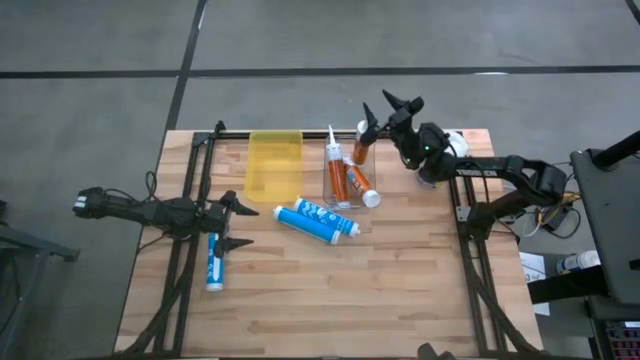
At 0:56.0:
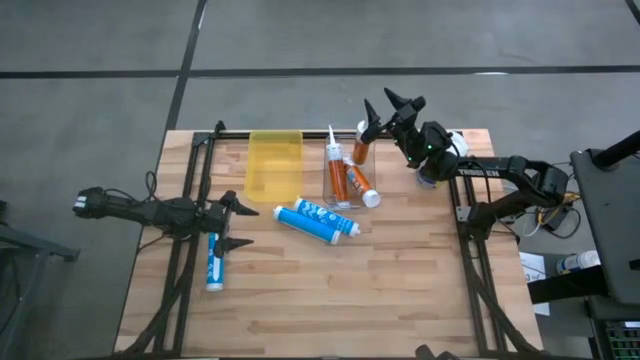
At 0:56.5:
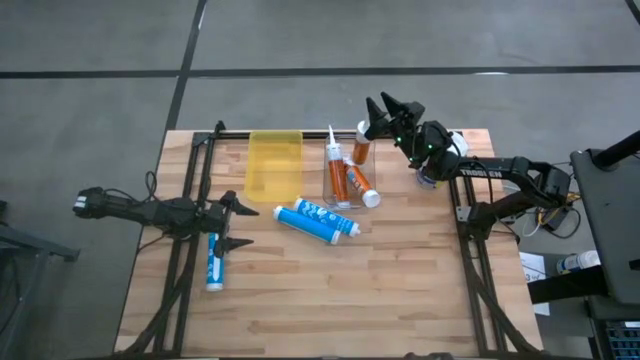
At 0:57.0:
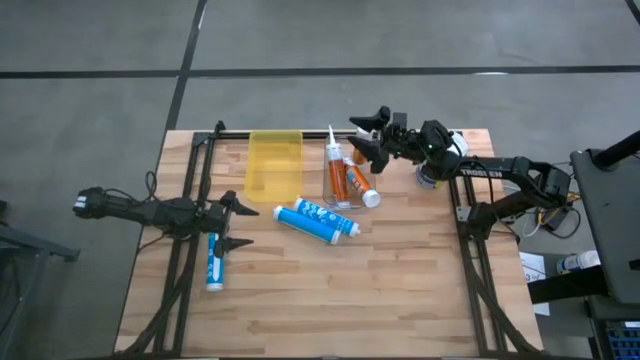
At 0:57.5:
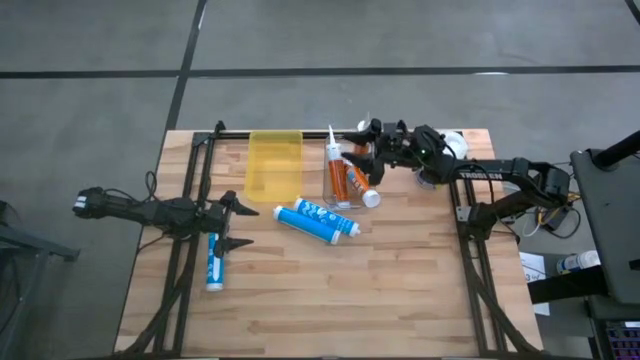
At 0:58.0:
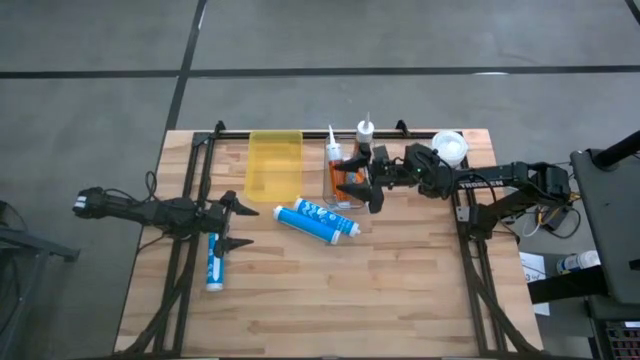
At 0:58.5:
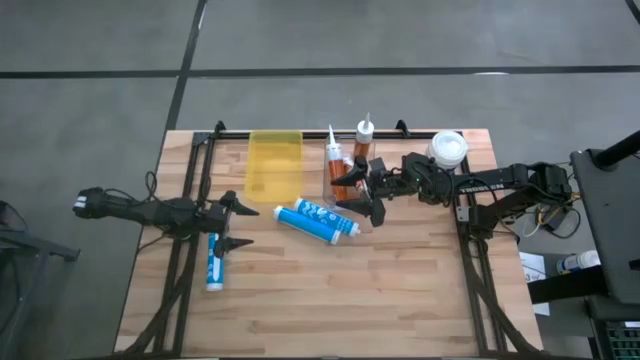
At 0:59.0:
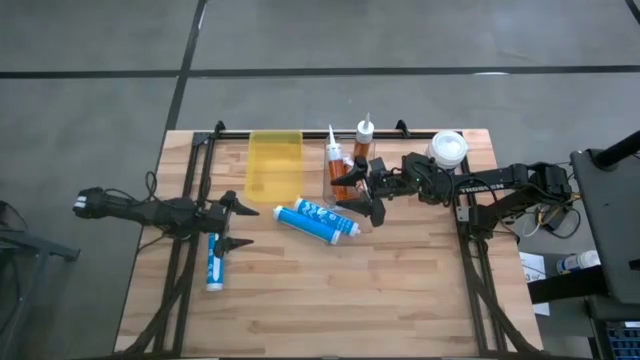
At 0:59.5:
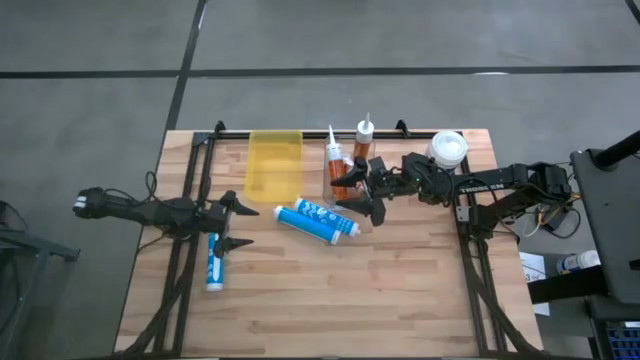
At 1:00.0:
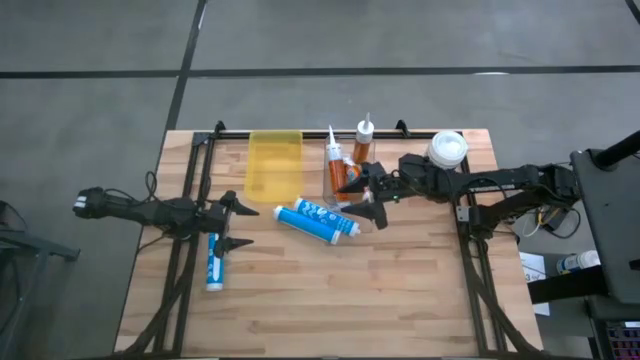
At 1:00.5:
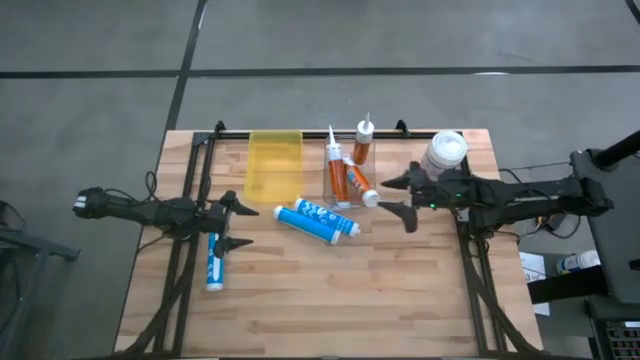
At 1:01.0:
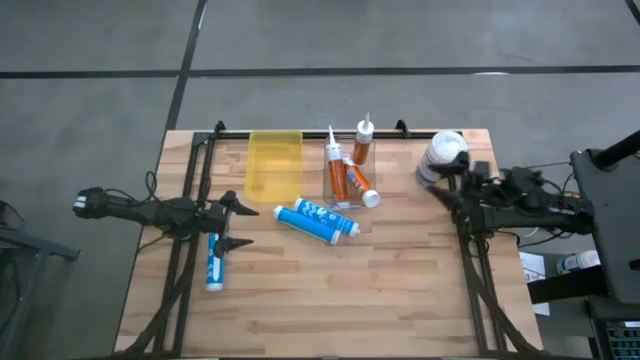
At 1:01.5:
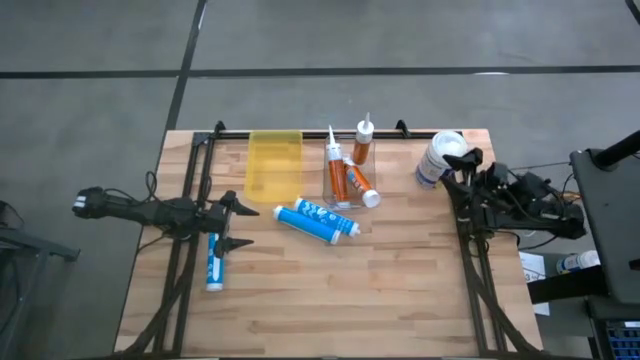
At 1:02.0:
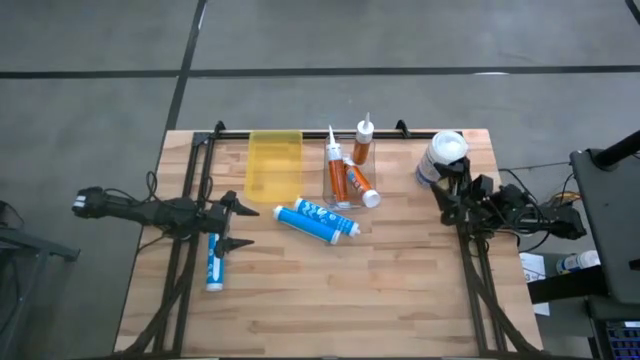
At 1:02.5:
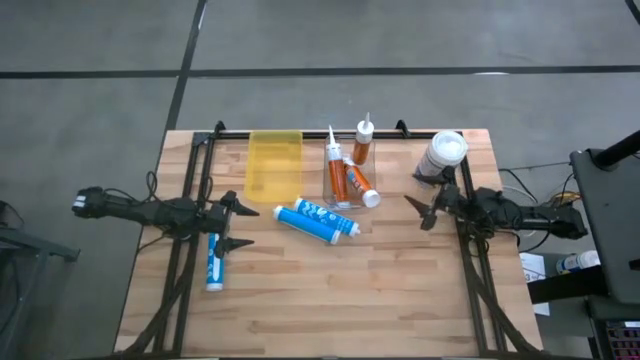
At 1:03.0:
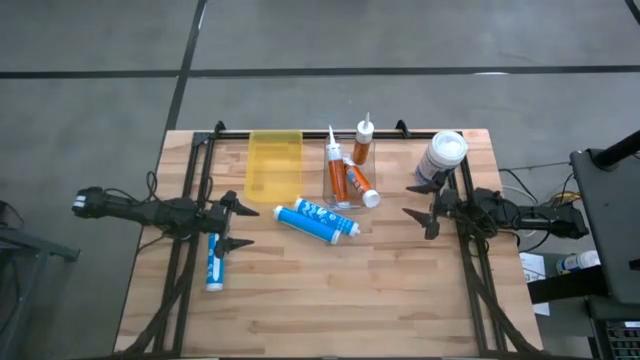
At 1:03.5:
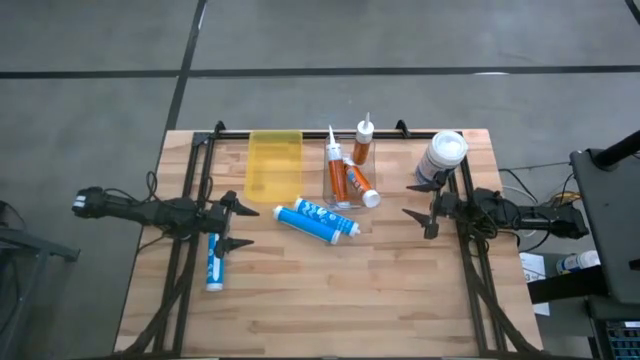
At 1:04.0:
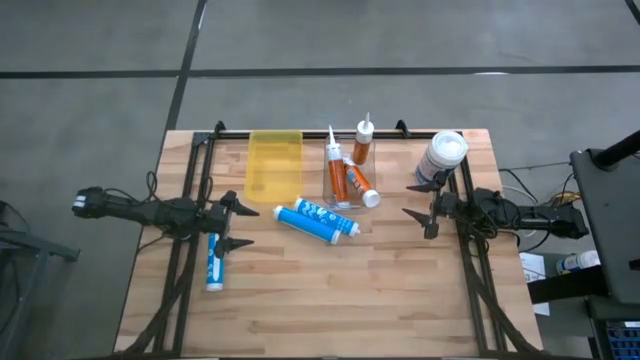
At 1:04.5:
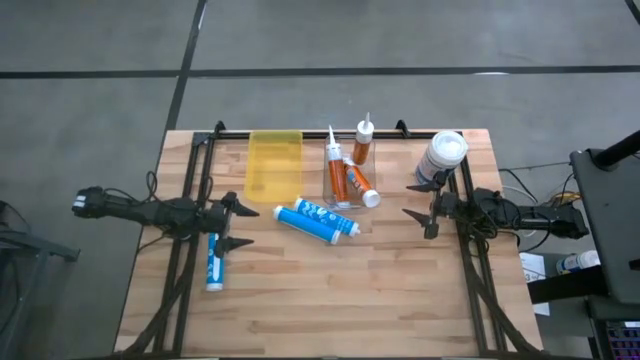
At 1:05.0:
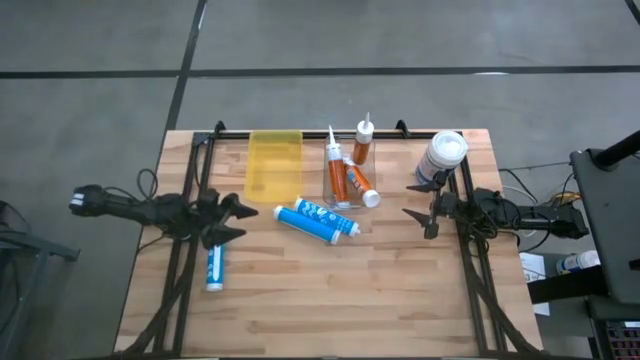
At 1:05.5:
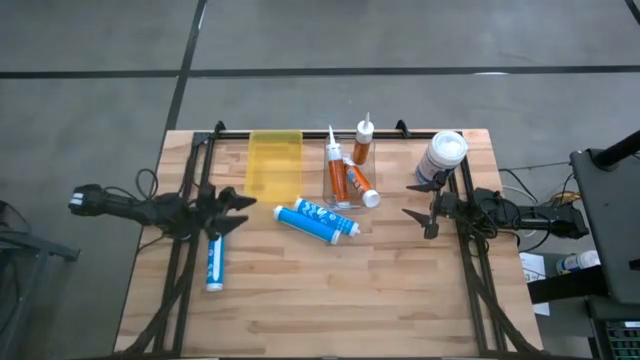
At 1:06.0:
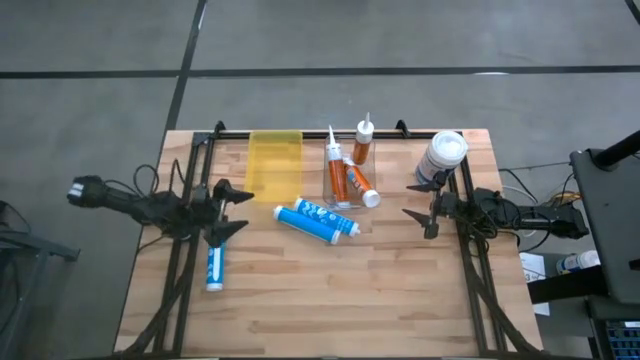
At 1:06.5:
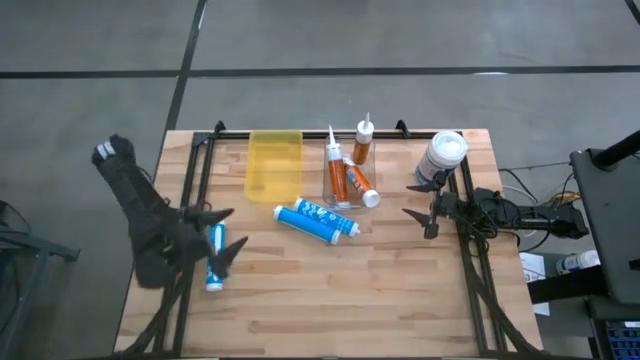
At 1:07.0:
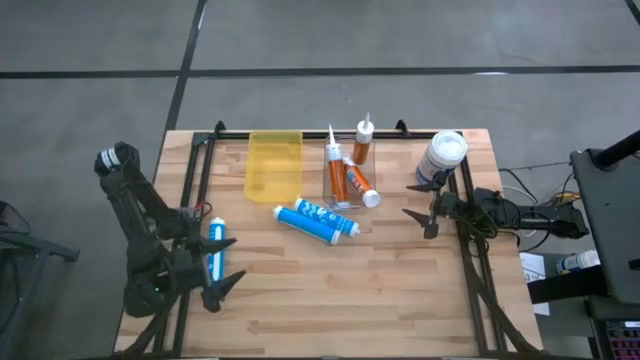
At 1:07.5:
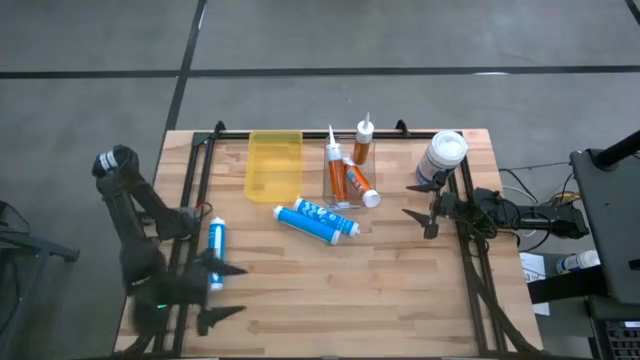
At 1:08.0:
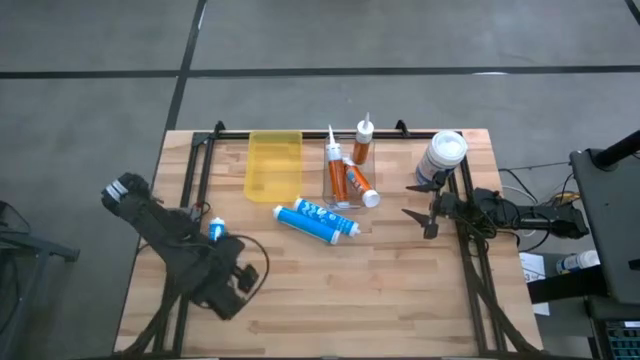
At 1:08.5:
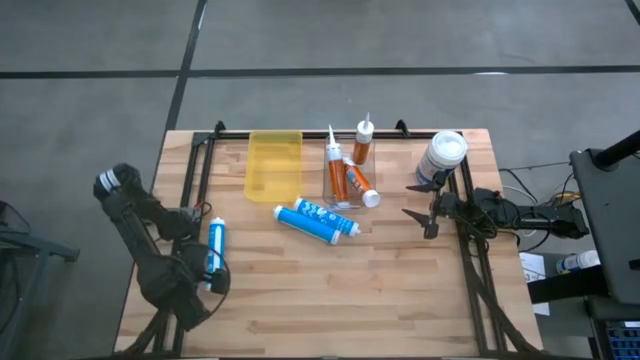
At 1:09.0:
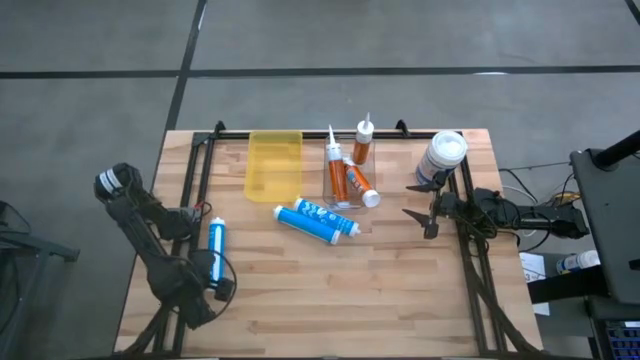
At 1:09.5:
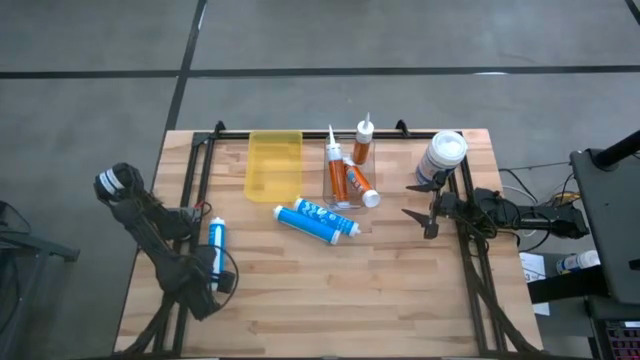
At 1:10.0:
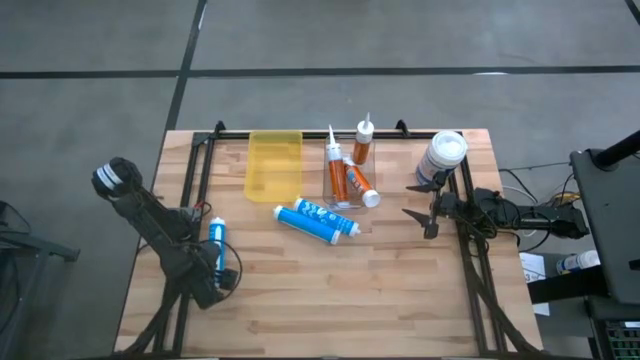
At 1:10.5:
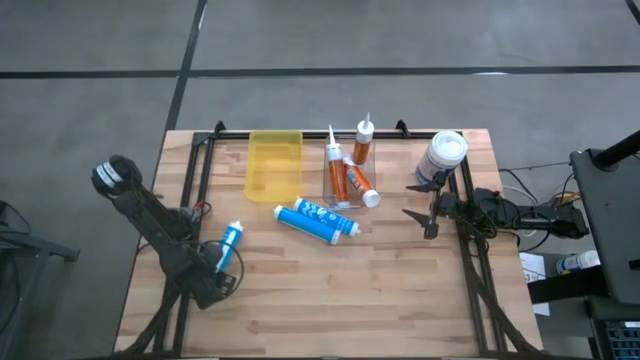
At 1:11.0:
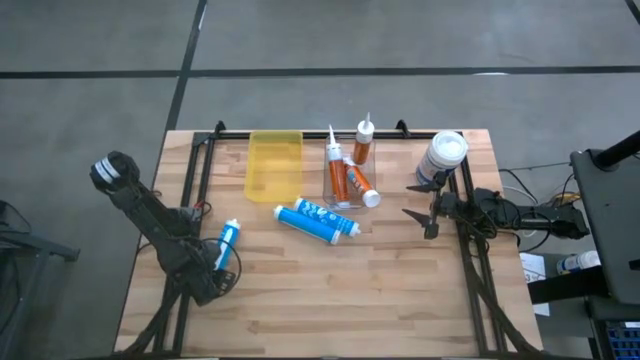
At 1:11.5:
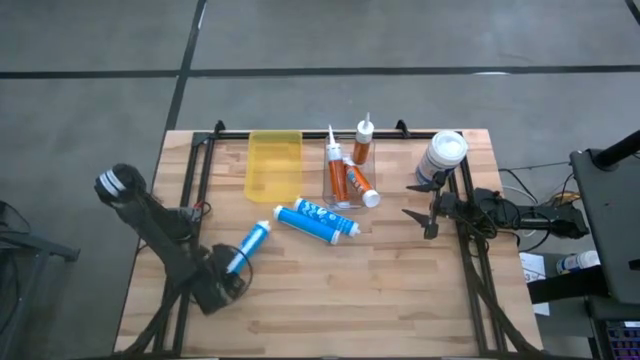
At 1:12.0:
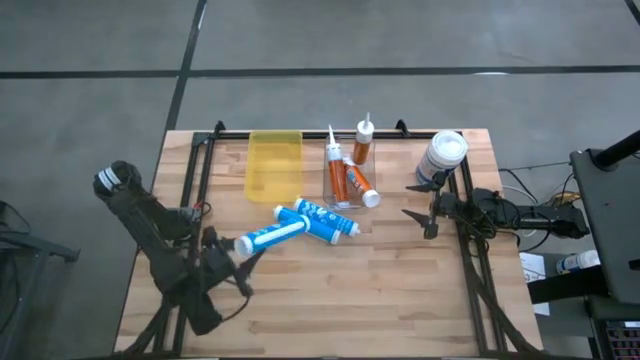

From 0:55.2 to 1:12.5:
Task: Pick & place silicon tubes, Sealant and Lysol wipes
Put the left blue sealant into the yellow bin

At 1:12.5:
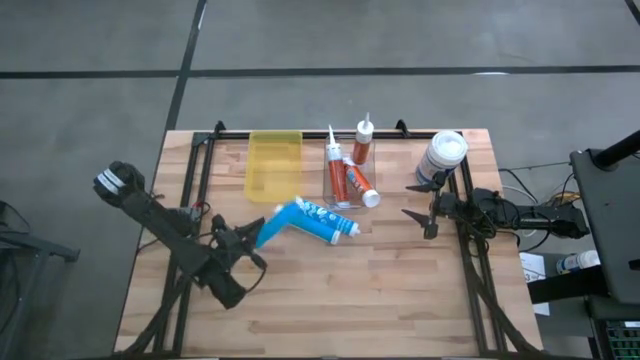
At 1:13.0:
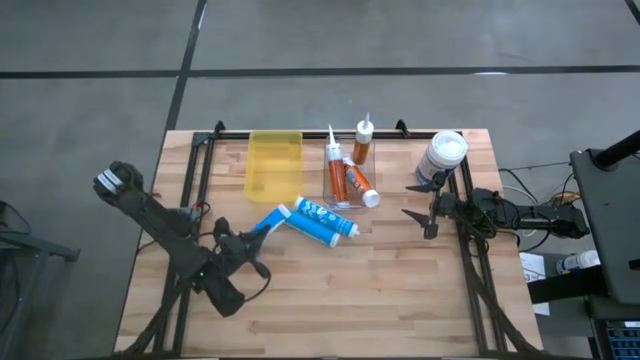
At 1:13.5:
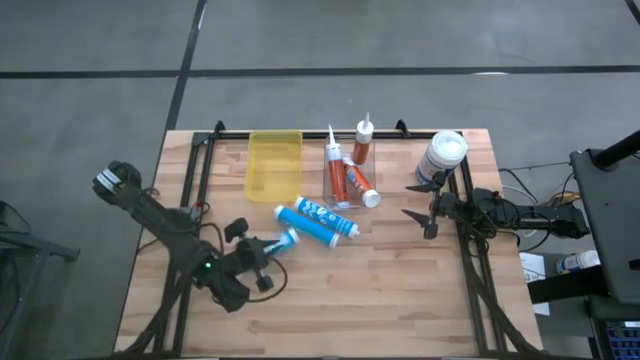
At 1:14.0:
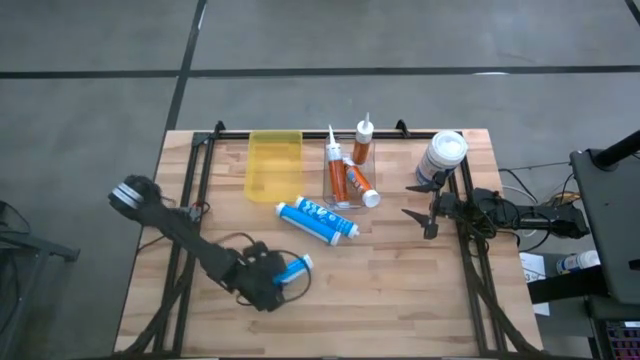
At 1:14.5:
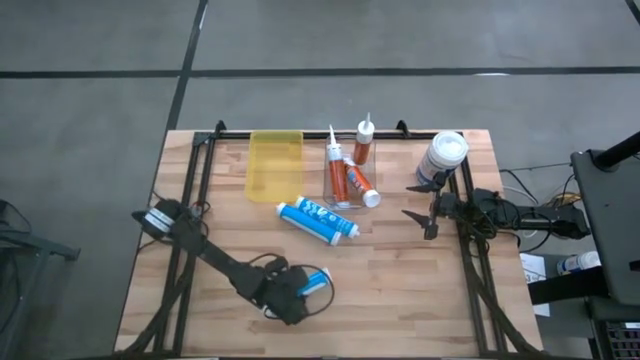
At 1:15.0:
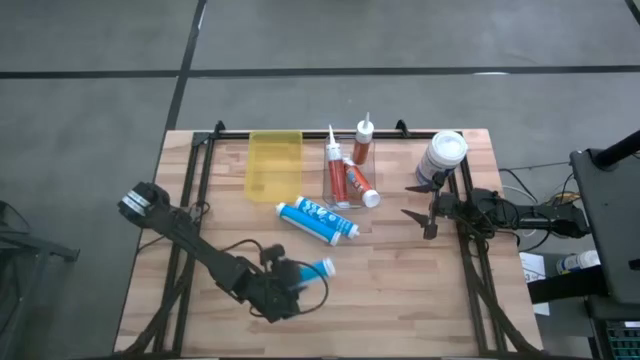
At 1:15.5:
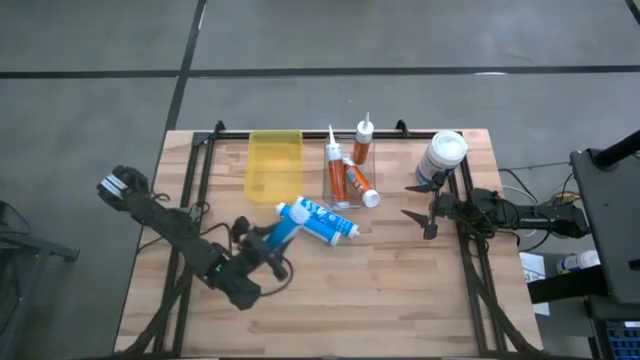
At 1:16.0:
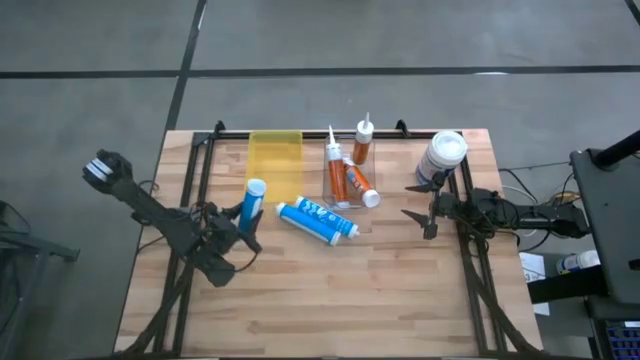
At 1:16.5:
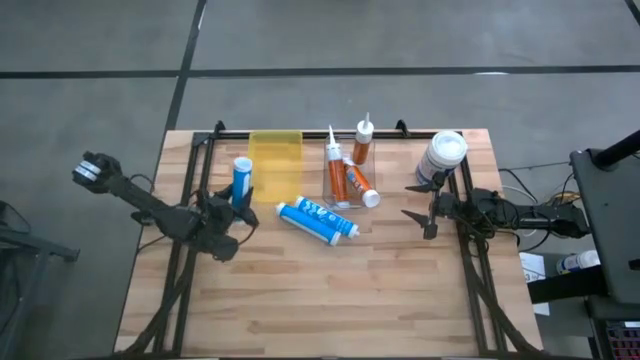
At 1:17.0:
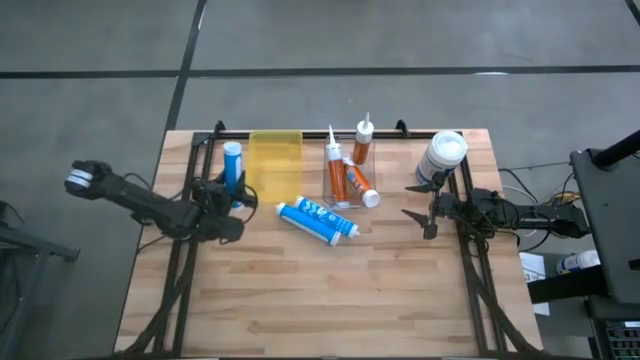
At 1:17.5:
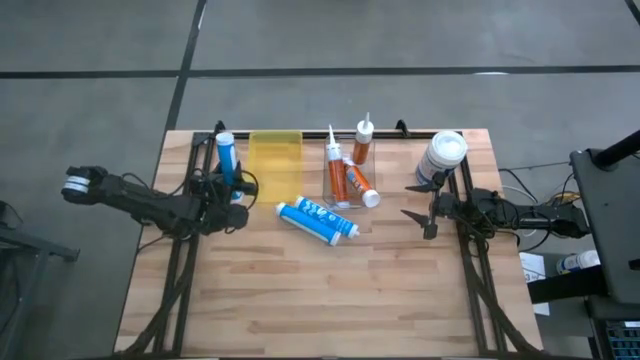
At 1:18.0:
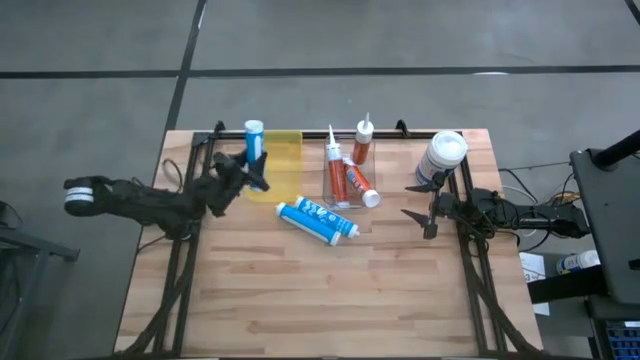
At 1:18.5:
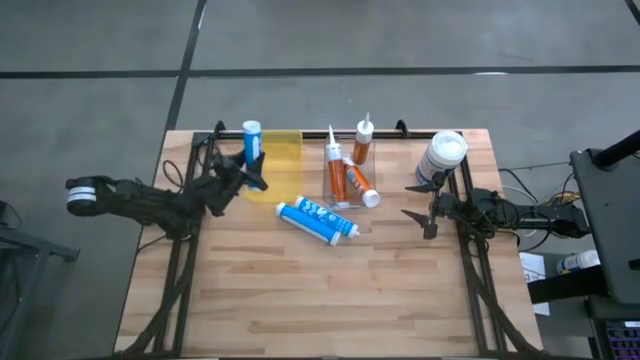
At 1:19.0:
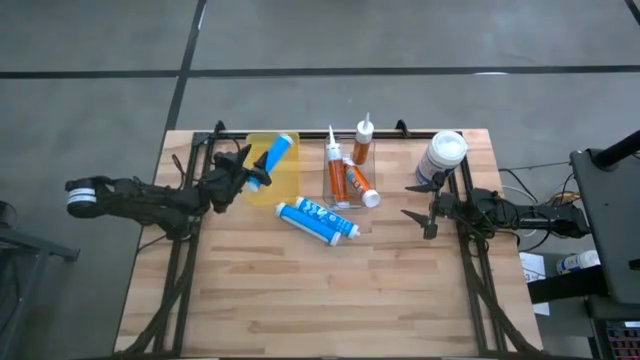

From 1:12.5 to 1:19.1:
Put the left blue sealant into the yellow bin
